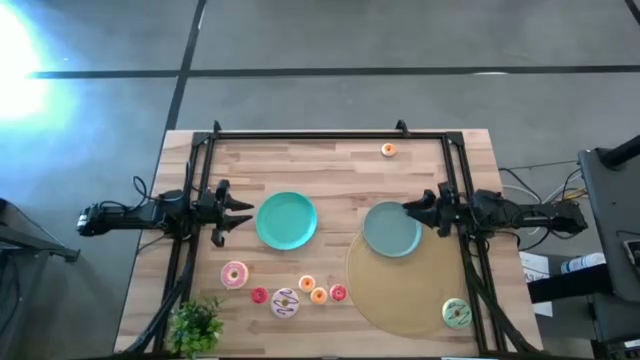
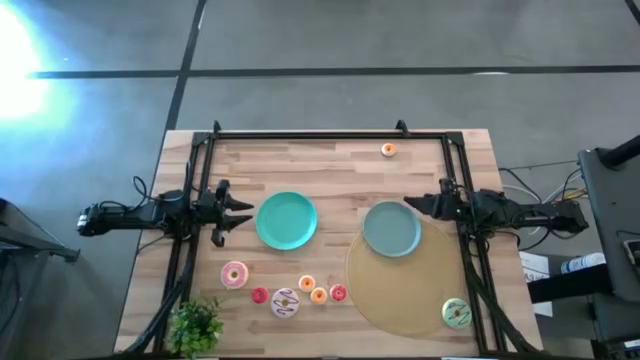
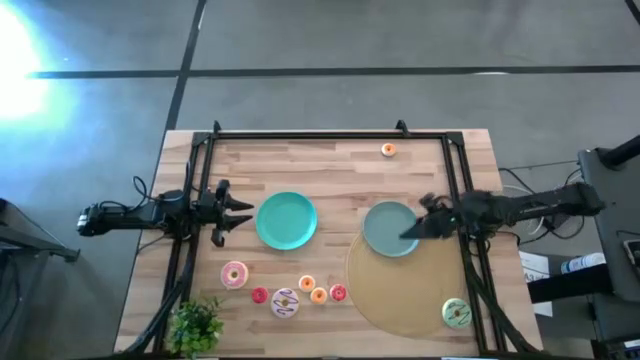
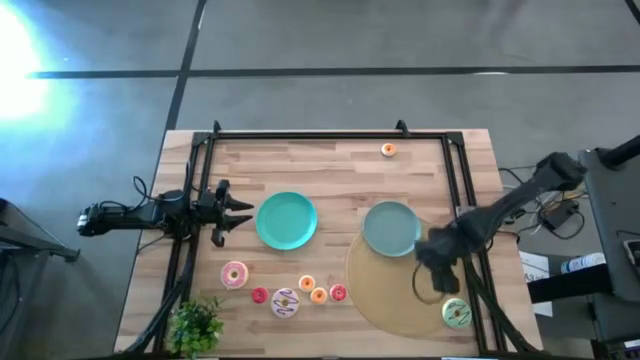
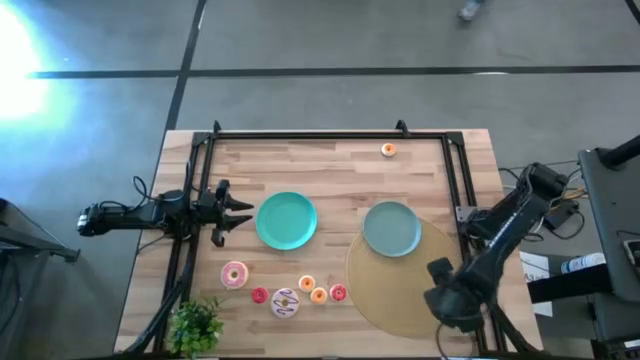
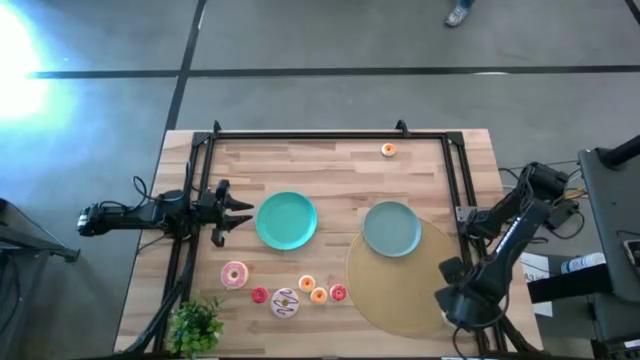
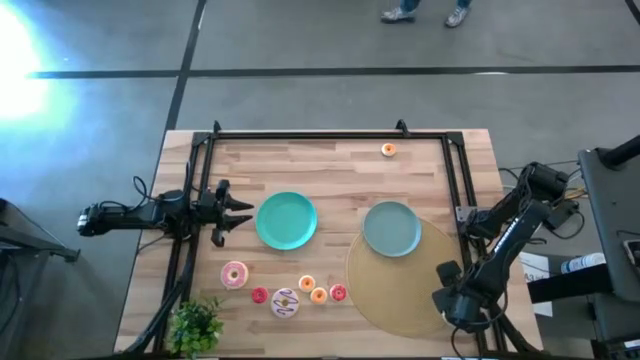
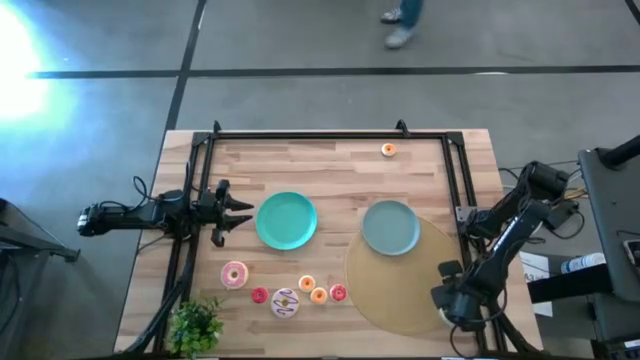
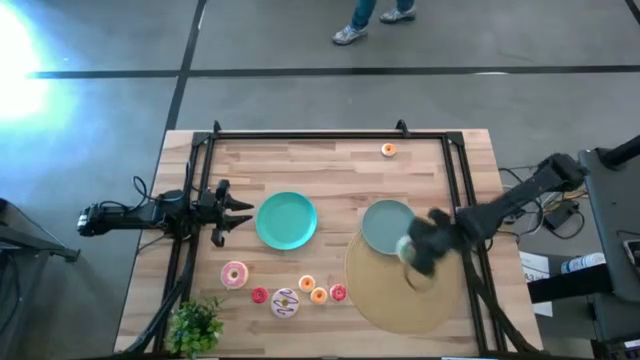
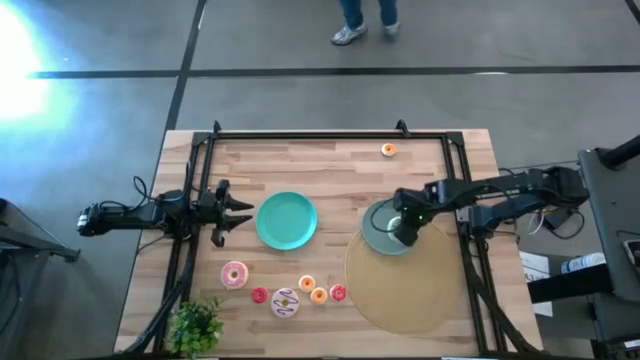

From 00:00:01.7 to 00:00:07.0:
Task: Pick & Place donuts
Put the large blue donut on the gray plate

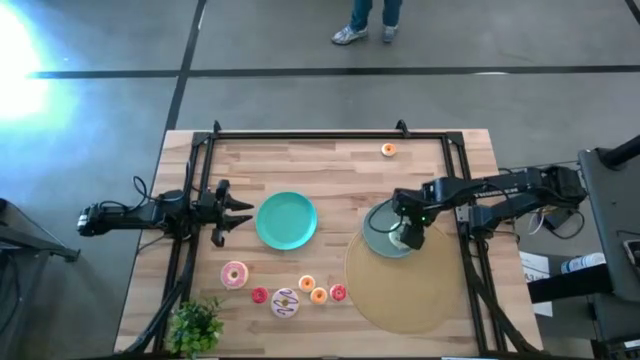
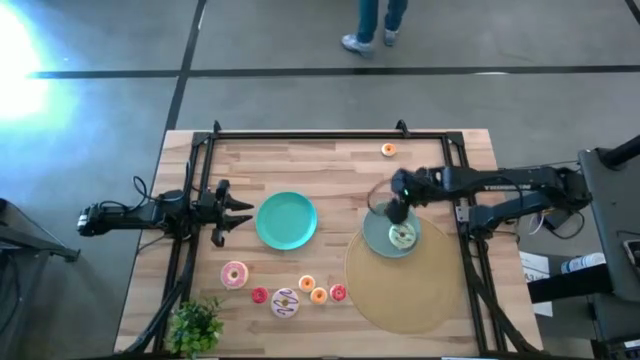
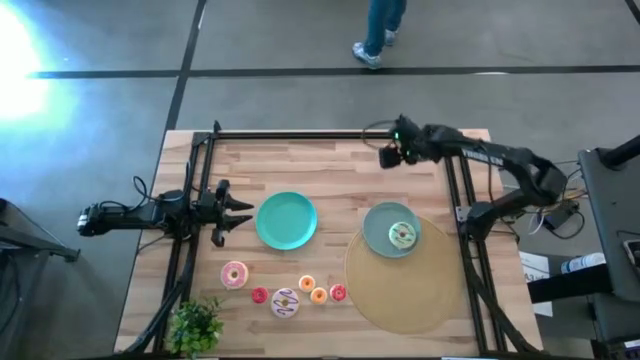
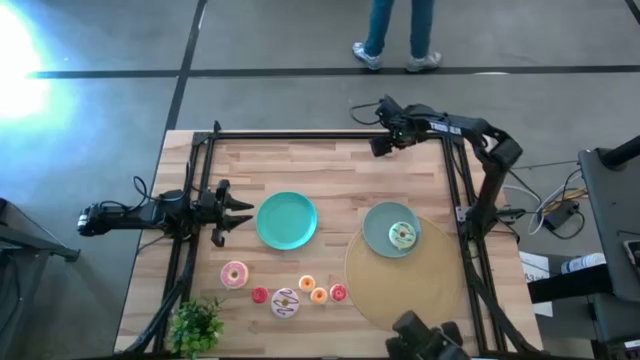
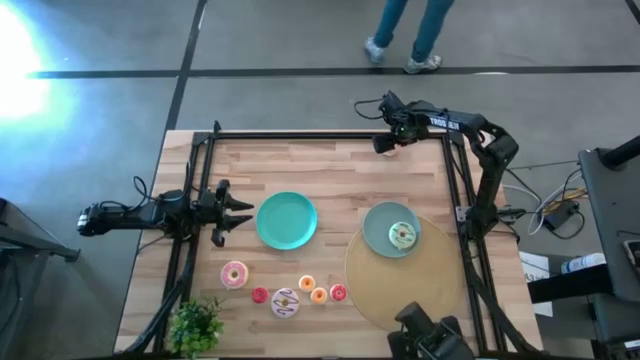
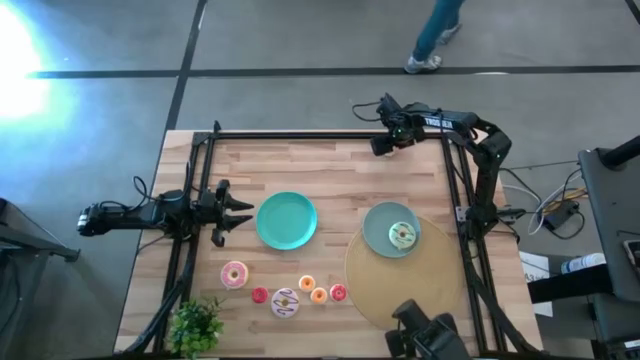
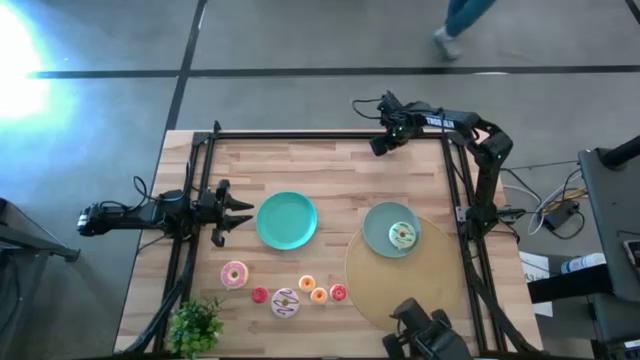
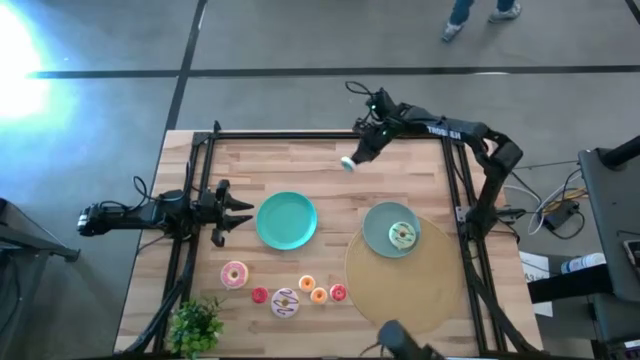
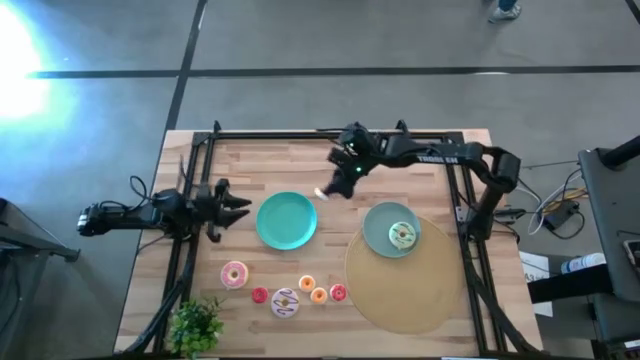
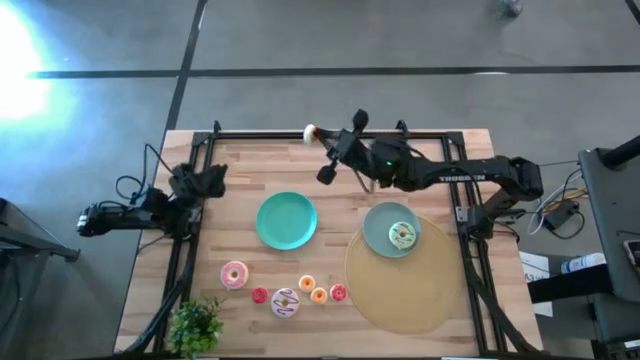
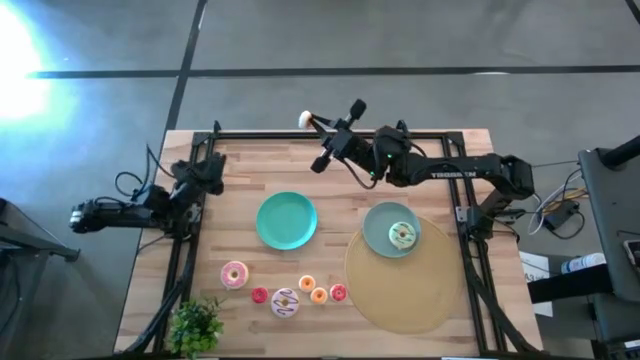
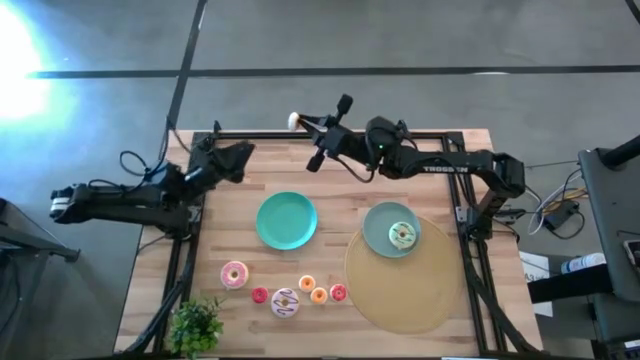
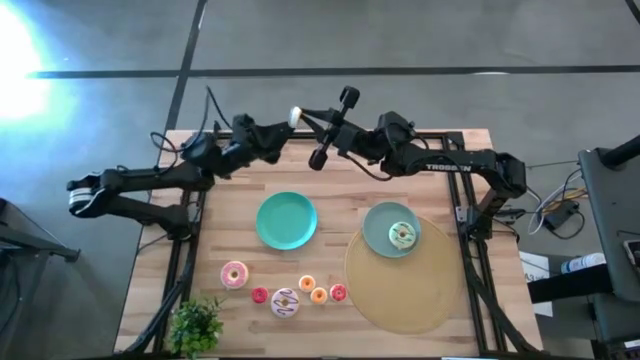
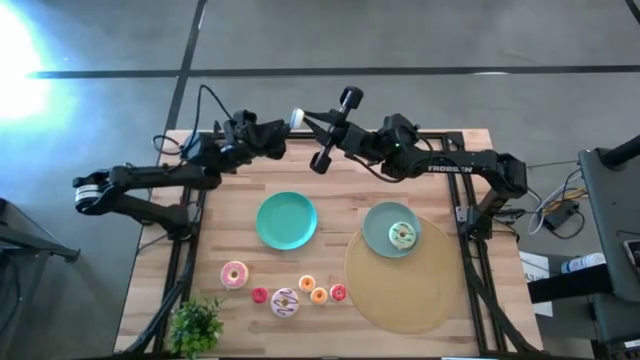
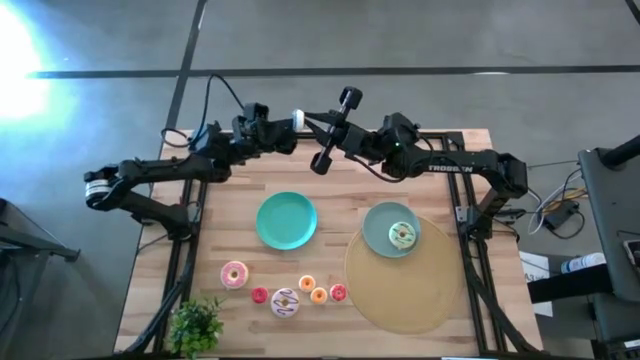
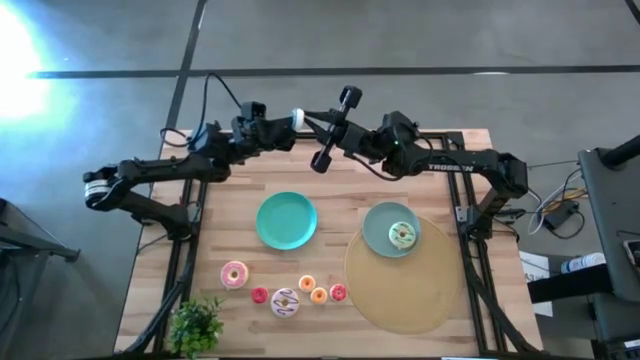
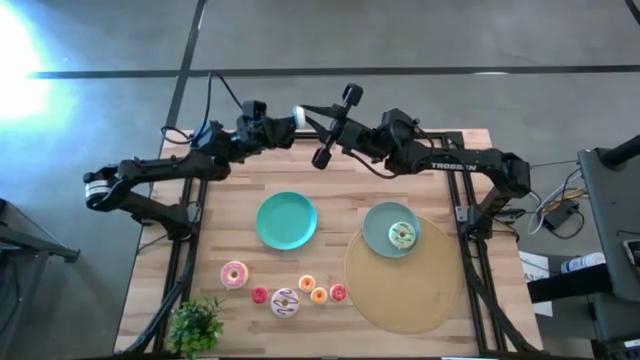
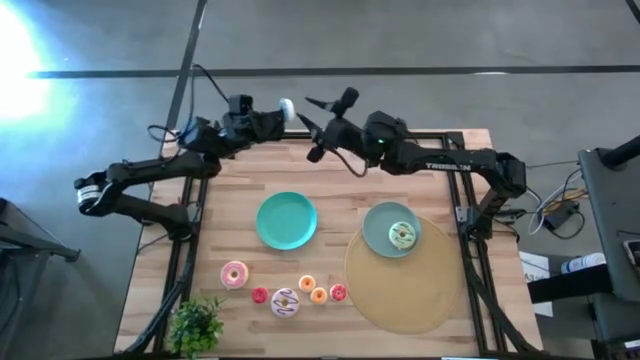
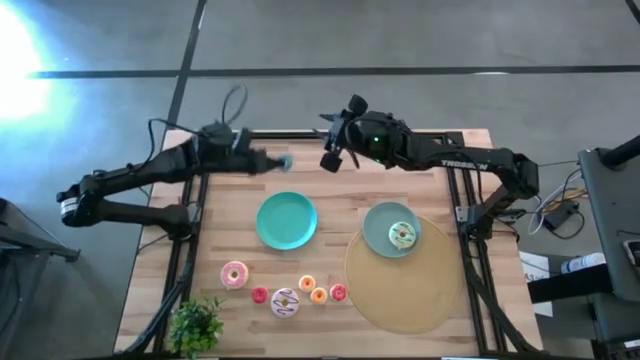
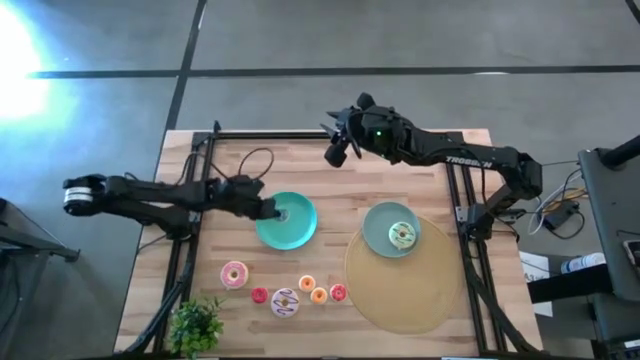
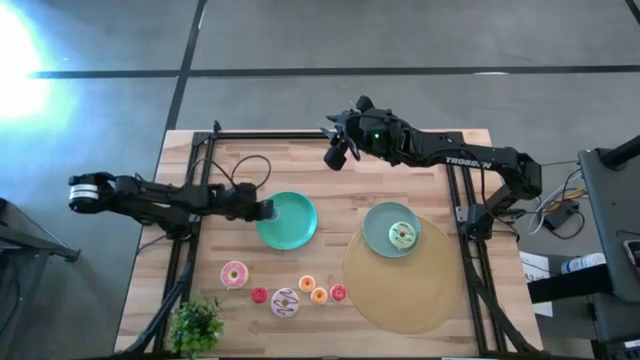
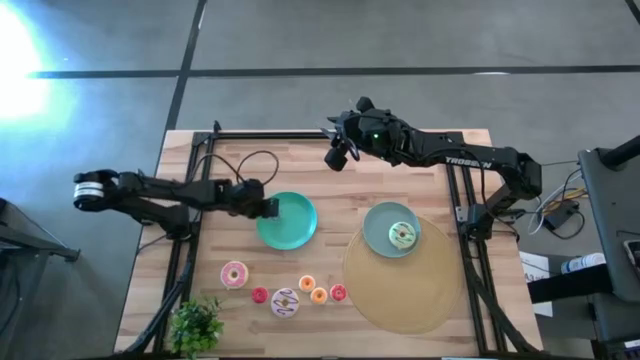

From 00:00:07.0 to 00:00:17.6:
Put the small blue donut on the blue plate

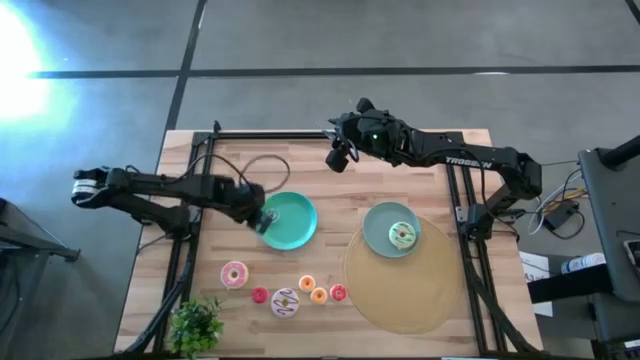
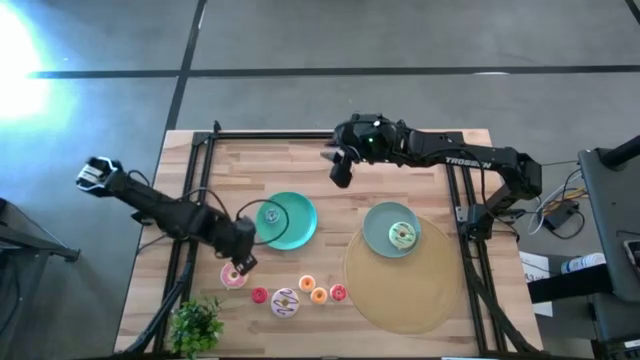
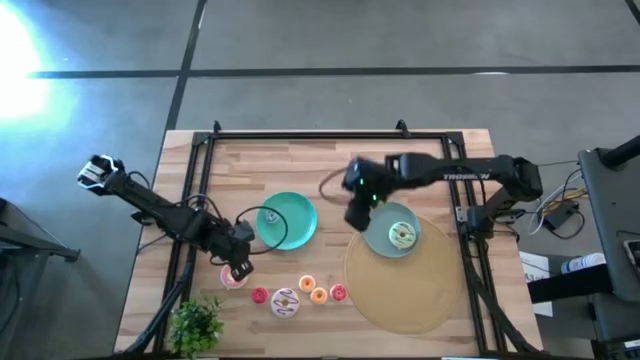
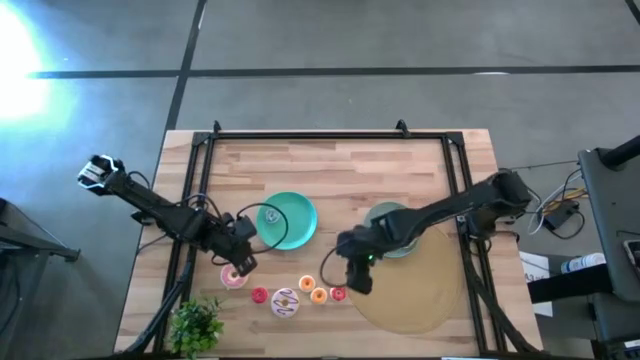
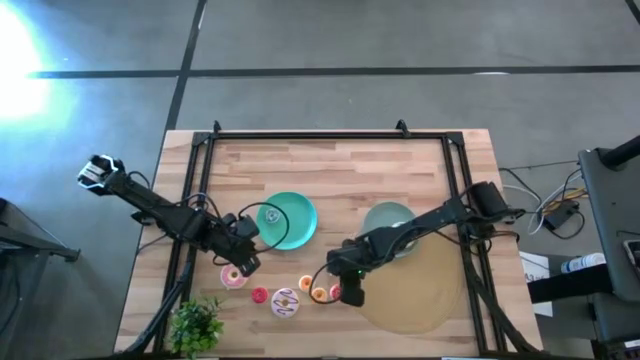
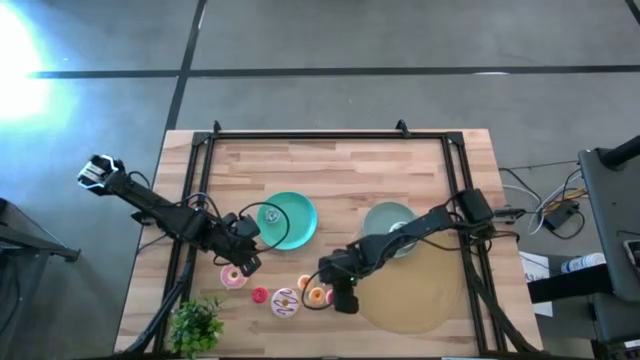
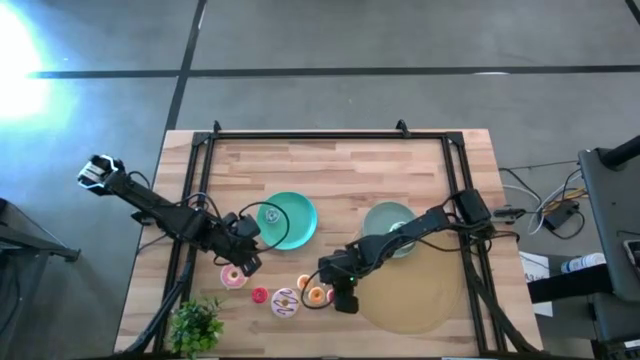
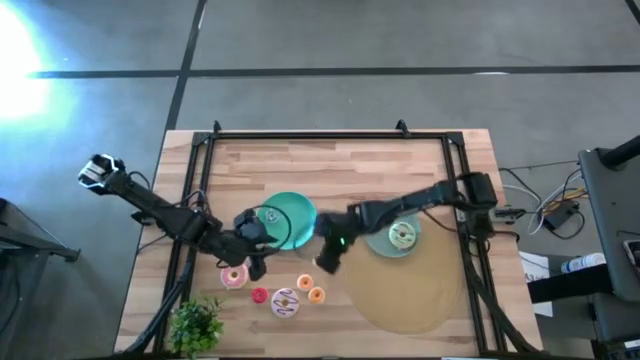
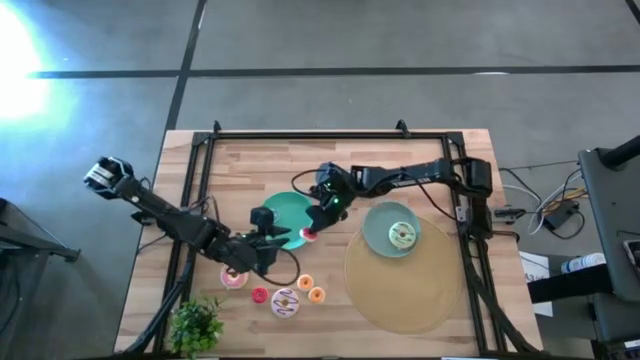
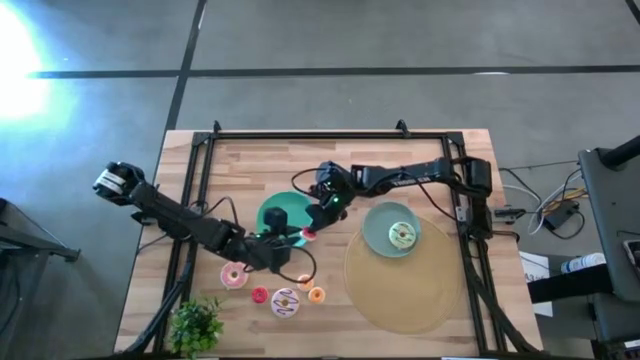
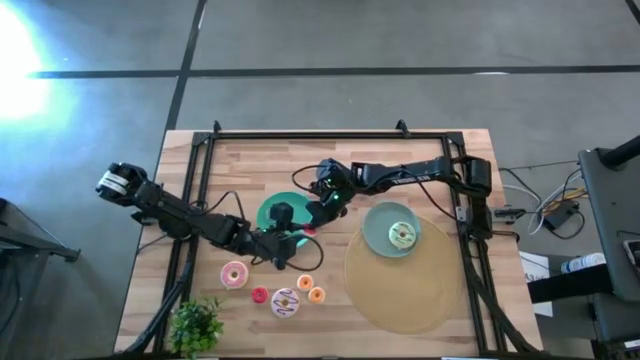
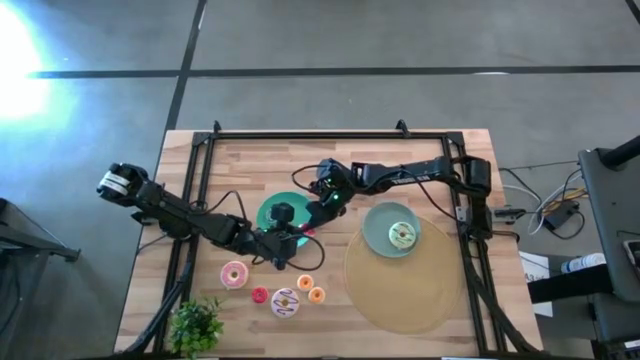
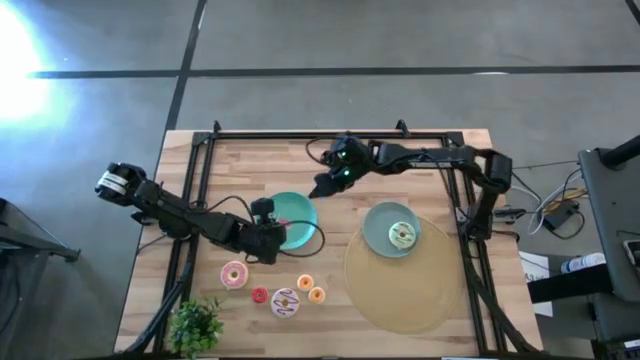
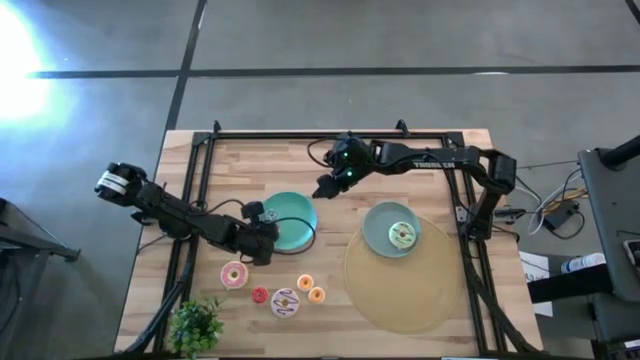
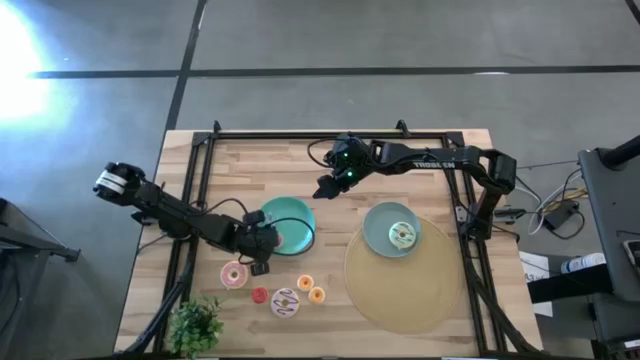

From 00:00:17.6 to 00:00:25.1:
Put the small light red donut on the blue plate
